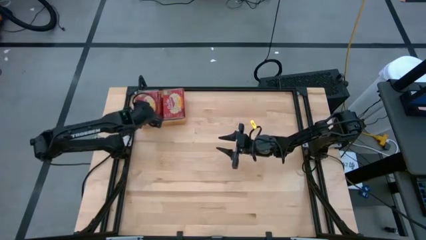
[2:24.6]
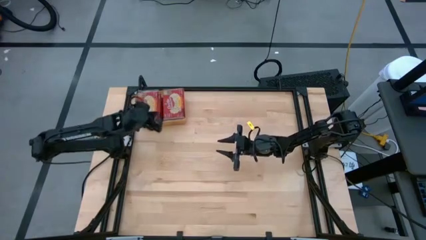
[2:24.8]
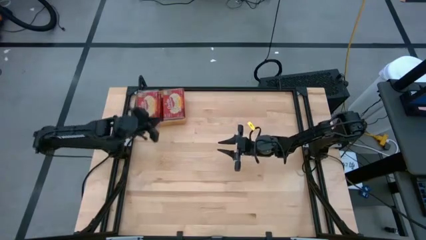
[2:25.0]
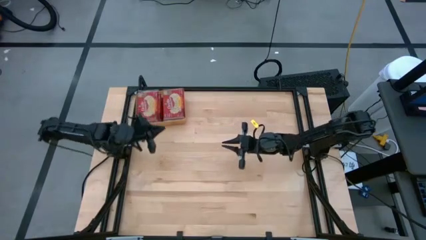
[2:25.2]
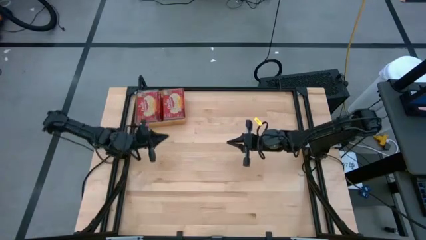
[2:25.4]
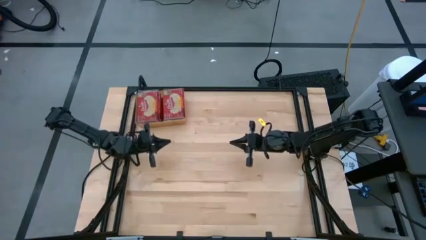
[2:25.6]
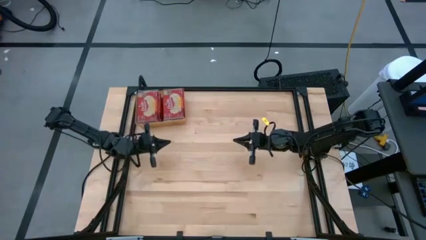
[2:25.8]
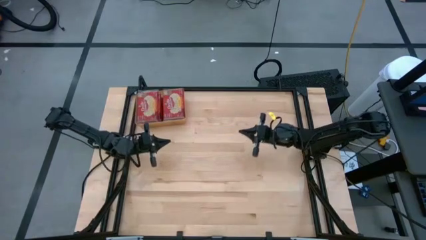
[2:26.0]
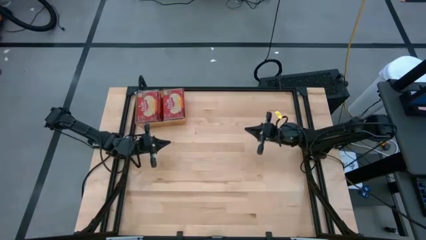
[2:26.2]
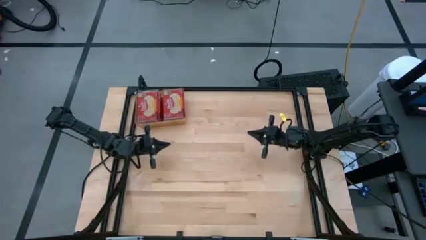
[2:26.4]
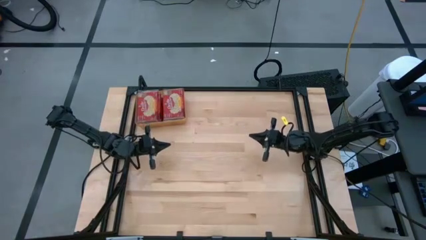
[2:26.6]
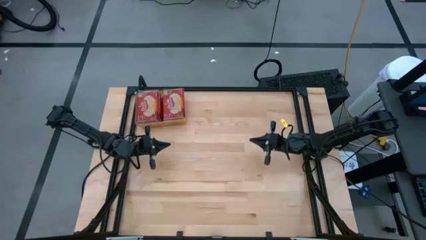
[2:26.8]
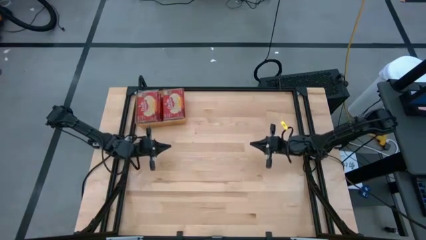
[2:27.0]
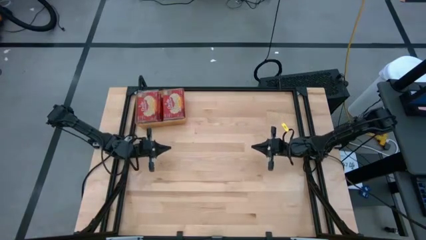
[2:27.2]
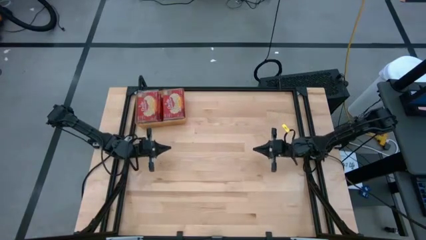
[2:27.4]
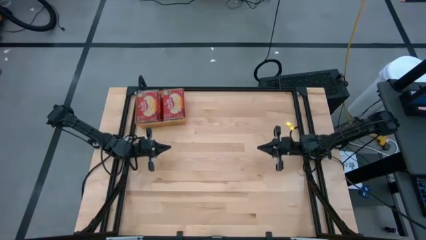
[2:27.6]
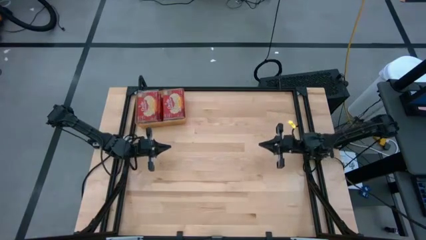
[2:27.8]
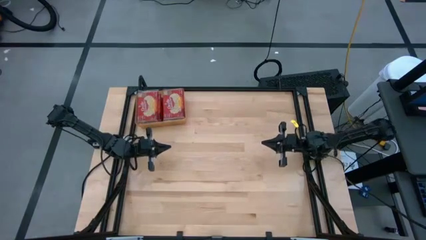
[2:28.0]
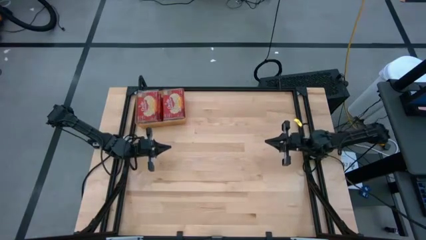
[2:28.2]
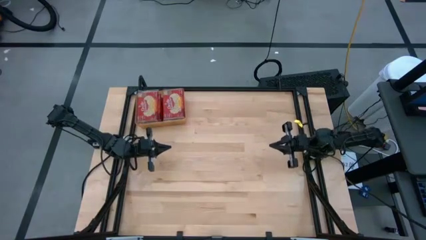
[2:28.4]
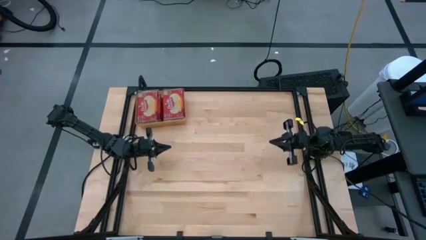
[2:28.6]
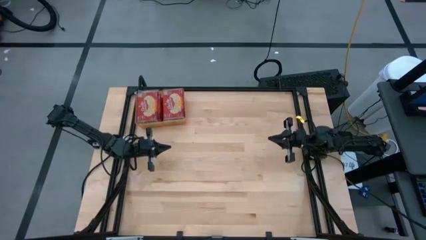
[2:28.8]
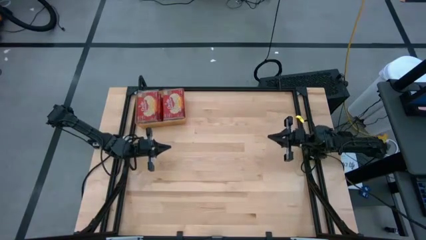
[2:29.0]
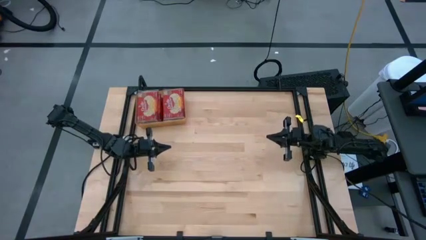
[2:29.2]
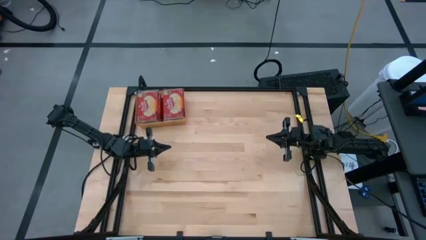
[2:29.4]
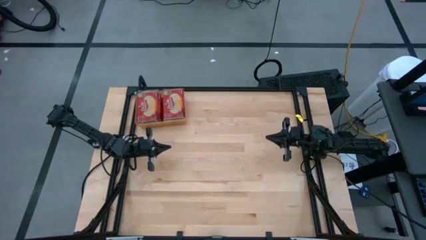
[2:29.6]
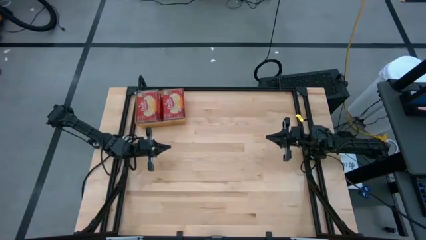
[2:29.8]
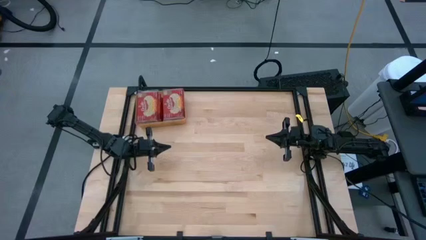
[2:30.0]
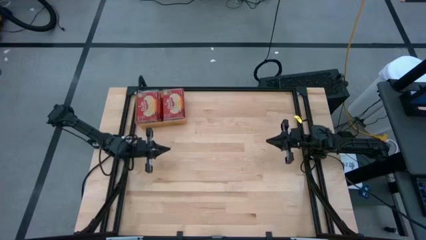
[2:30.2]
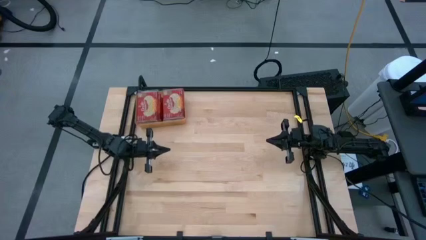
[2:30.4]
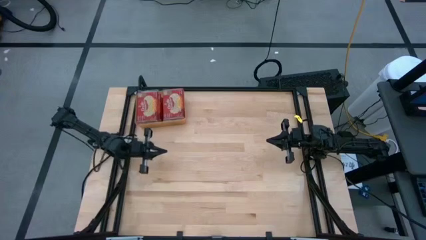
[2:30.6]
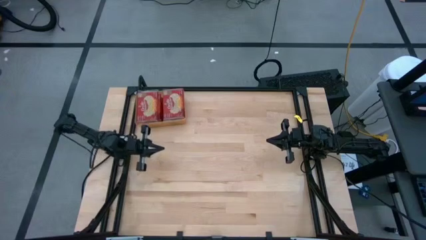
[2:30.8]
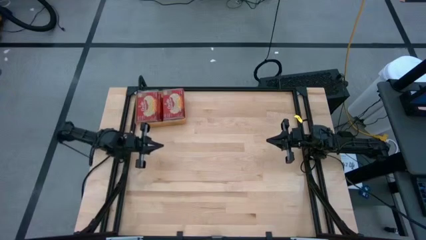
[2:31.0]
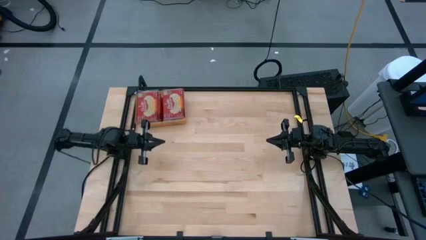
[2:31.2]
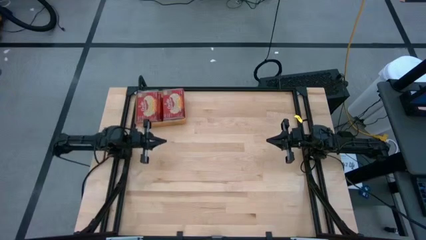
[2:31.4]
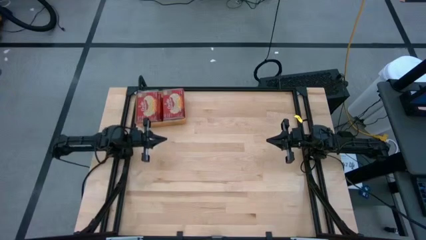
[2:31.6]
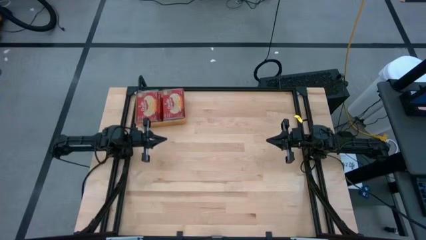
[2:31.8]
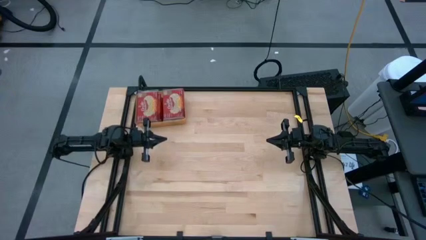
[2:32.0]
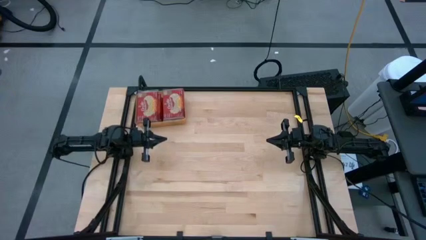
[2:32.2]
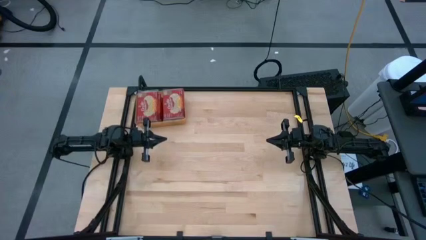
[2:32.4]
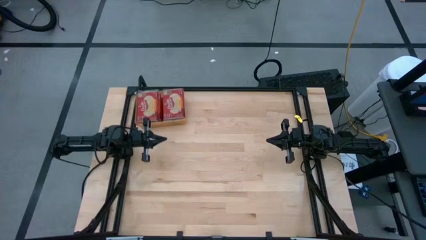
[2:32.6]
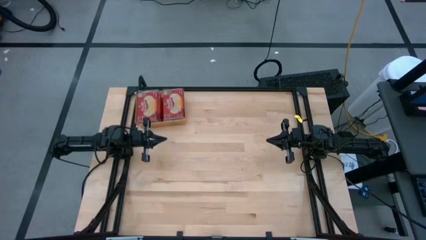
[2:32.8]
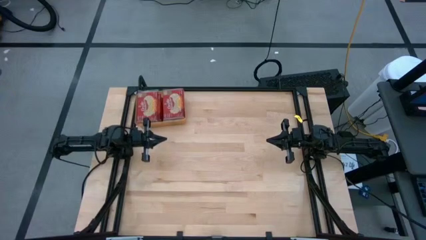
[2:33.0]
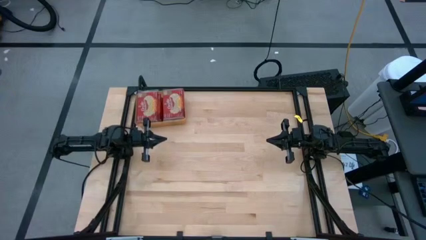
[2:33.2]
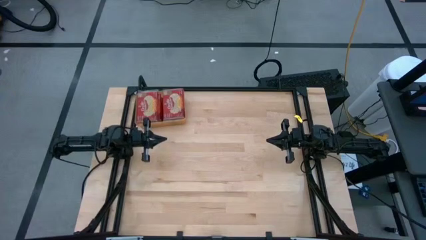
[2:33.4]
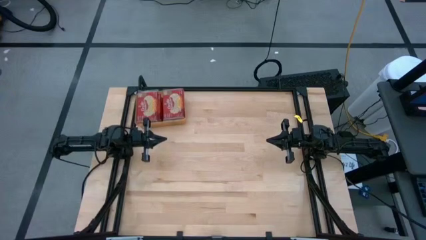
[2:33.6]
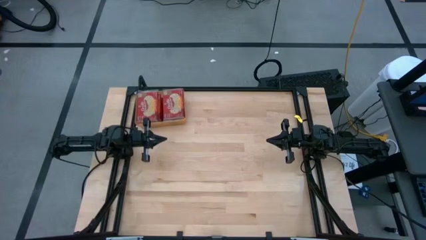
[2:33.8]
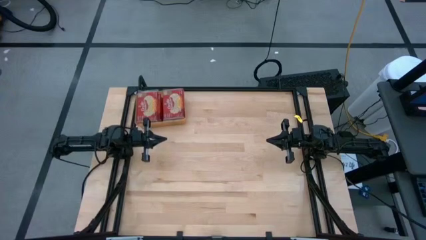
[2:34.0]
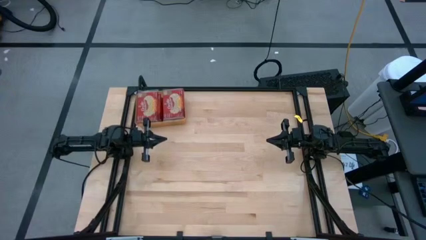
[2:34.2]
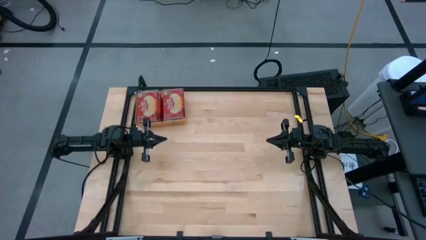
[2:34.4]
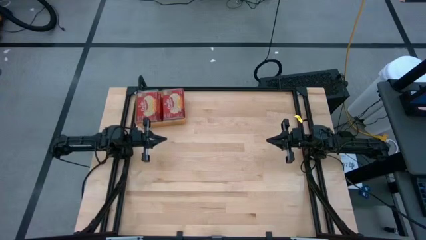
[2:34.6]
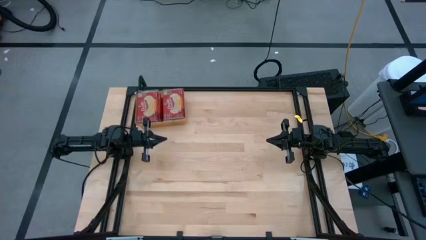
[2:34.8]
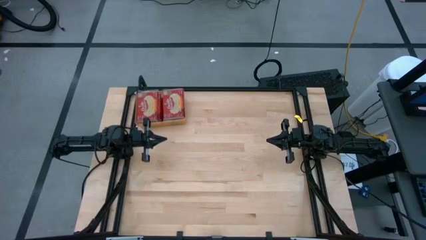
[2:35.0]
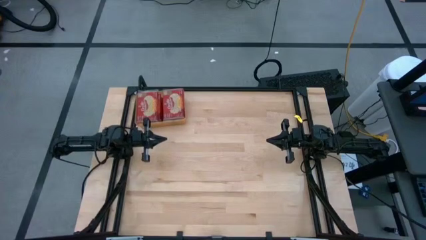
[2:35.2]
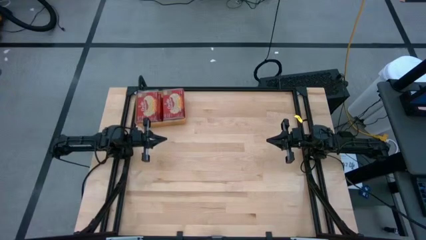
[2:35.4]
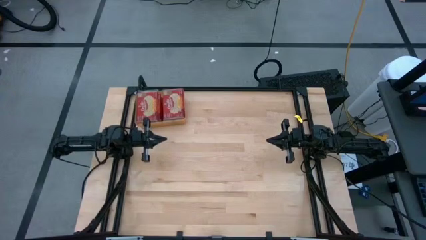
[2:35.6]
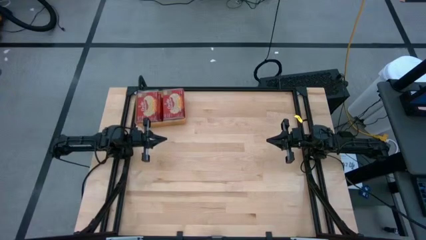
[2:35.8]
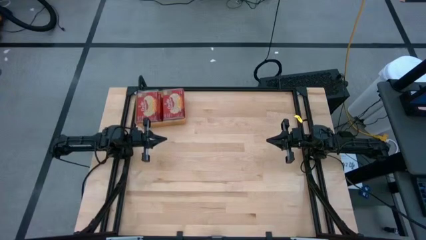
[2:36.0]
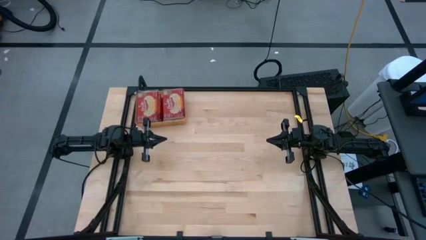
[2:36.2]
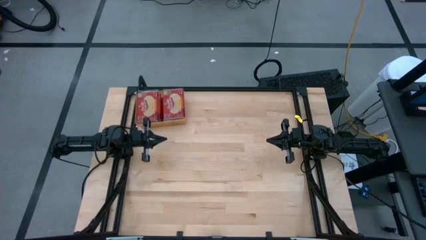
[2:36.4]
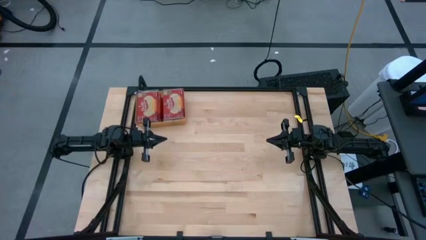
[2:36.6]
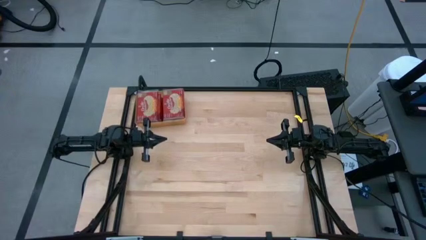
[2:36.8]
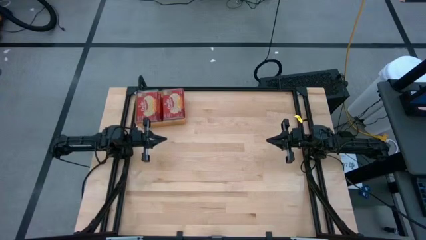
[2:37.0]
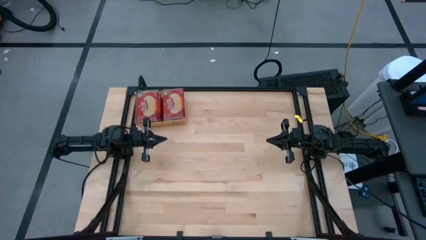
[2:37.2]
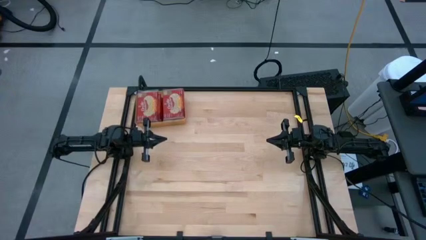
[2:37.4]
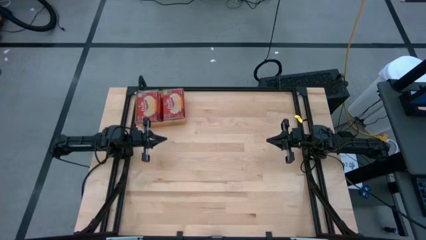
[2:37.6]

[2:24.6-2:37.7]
Task: Sort popcorn bags into baskets
Return to Home Position
